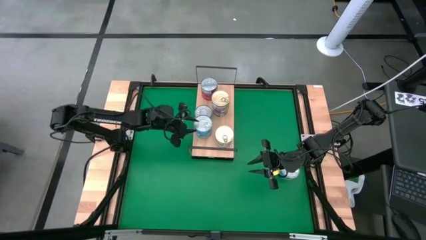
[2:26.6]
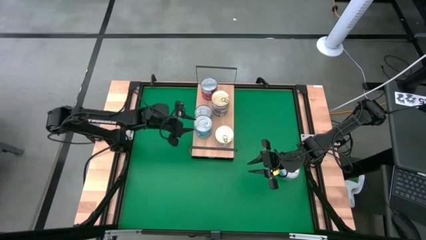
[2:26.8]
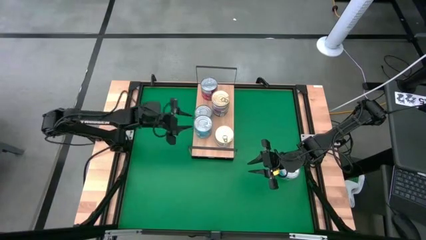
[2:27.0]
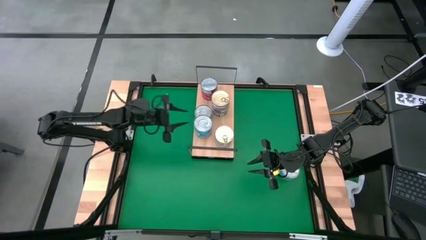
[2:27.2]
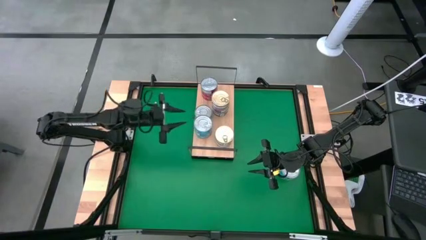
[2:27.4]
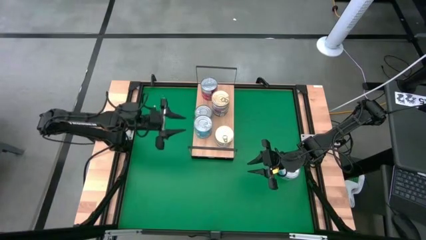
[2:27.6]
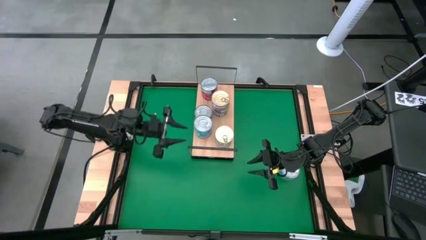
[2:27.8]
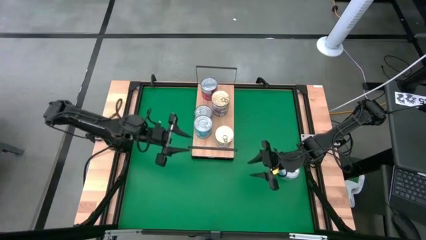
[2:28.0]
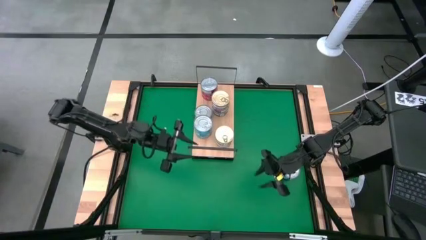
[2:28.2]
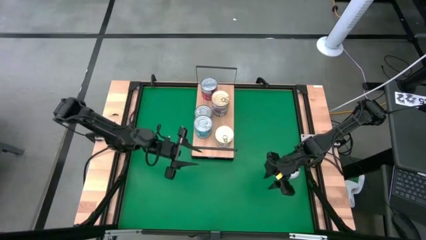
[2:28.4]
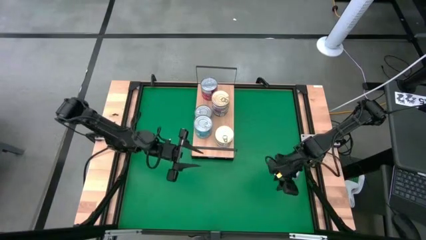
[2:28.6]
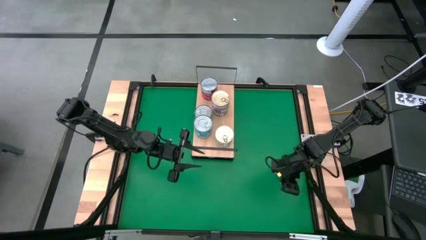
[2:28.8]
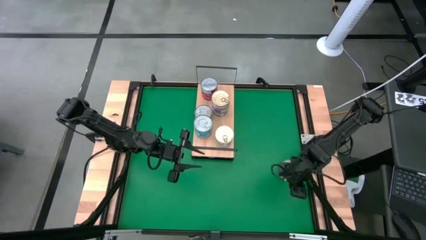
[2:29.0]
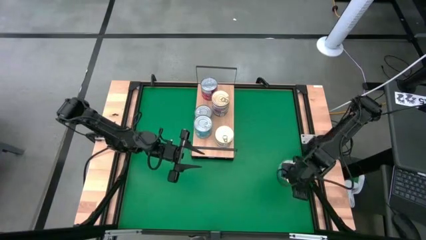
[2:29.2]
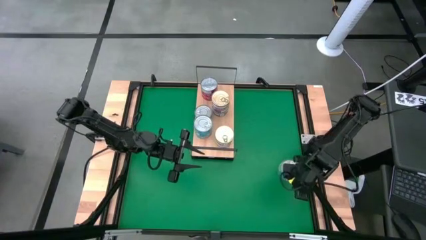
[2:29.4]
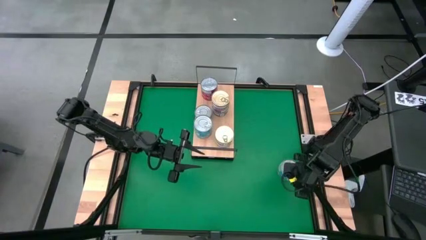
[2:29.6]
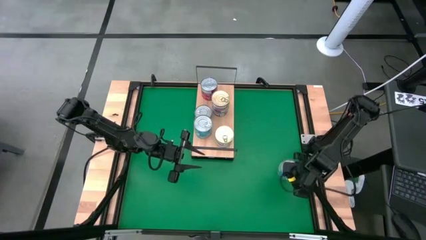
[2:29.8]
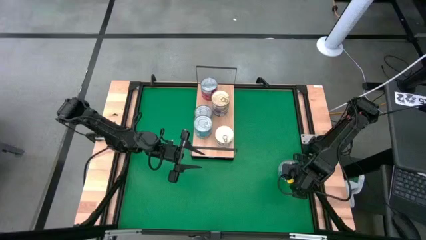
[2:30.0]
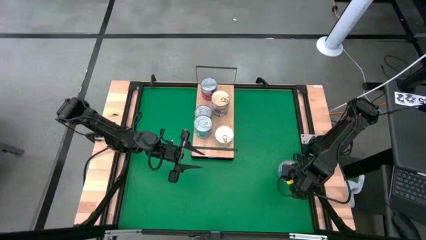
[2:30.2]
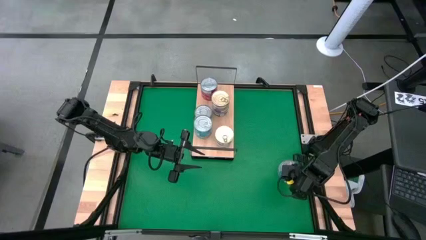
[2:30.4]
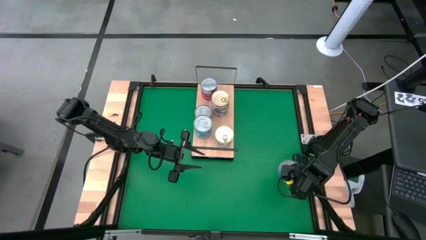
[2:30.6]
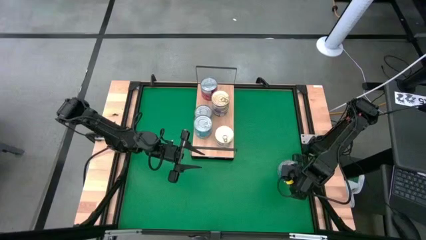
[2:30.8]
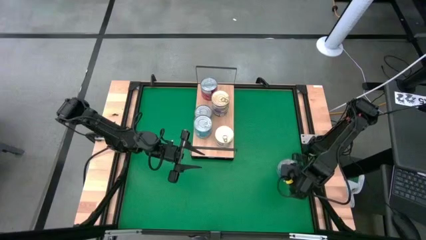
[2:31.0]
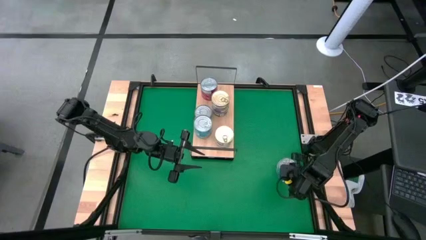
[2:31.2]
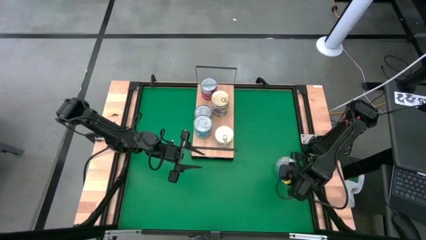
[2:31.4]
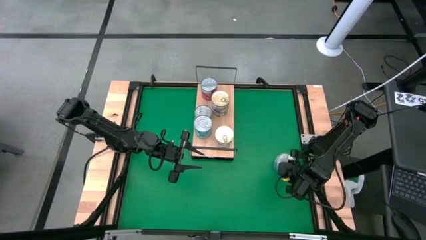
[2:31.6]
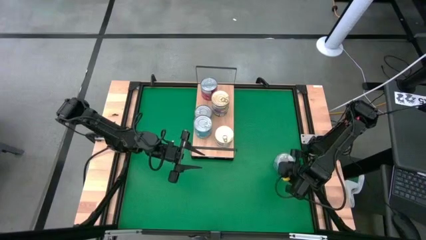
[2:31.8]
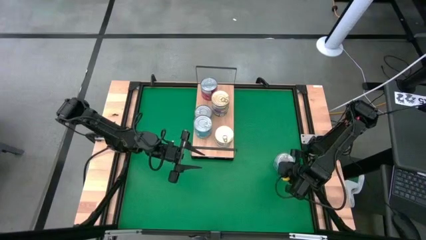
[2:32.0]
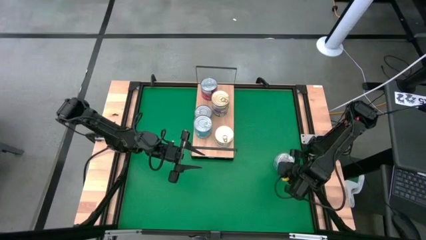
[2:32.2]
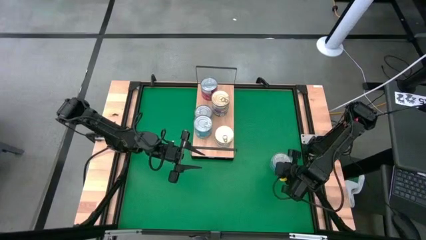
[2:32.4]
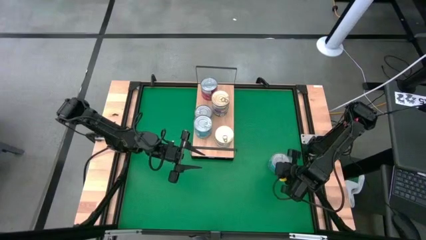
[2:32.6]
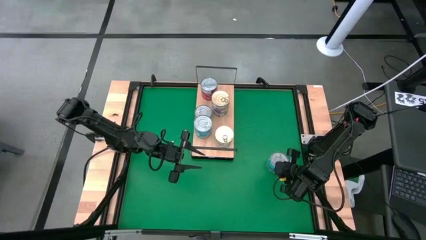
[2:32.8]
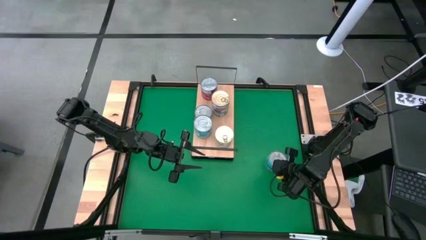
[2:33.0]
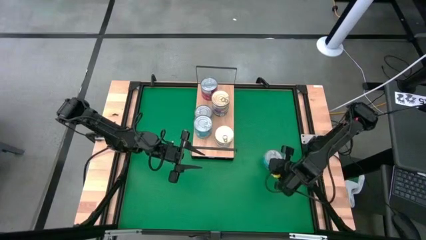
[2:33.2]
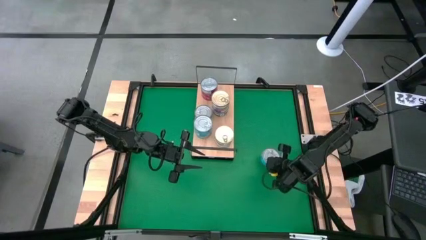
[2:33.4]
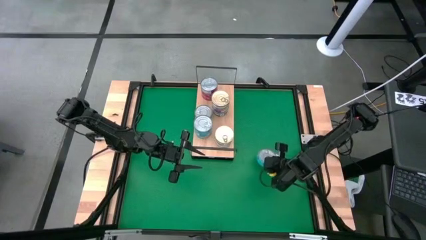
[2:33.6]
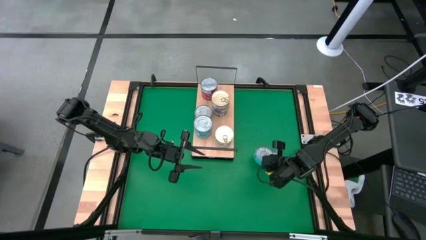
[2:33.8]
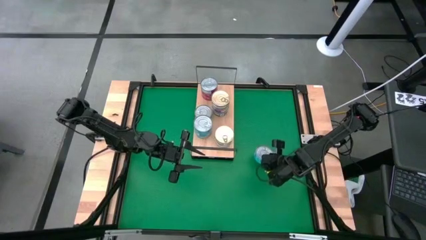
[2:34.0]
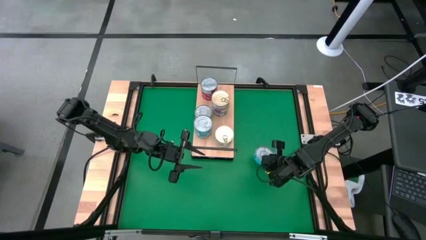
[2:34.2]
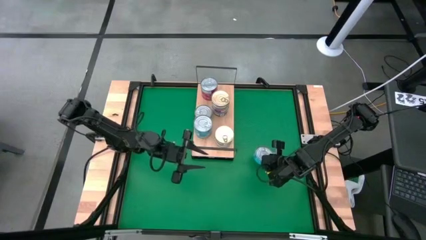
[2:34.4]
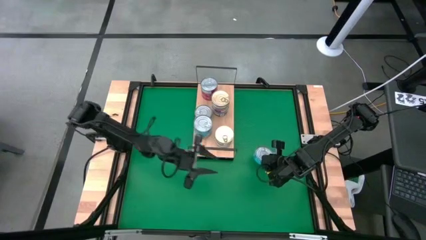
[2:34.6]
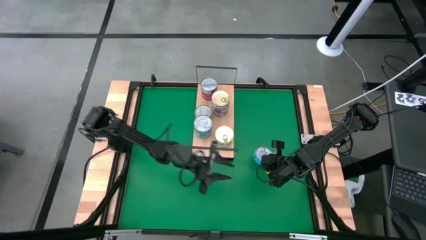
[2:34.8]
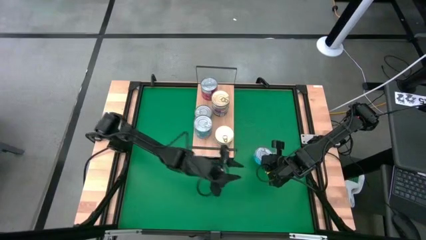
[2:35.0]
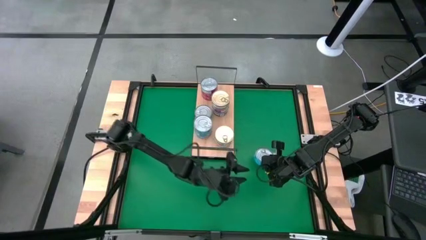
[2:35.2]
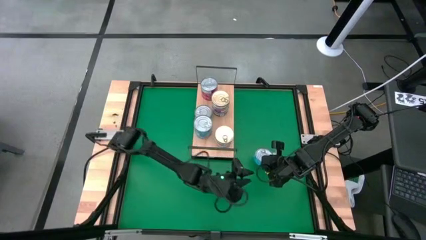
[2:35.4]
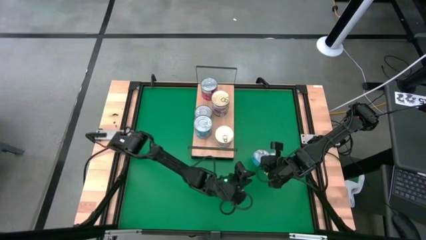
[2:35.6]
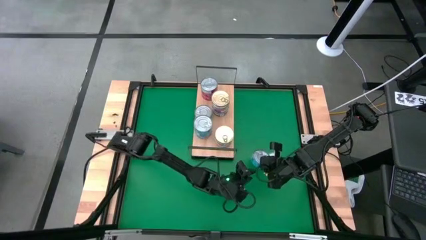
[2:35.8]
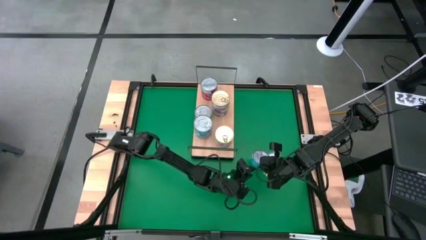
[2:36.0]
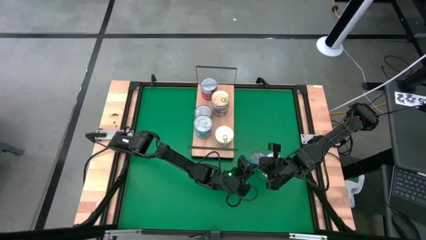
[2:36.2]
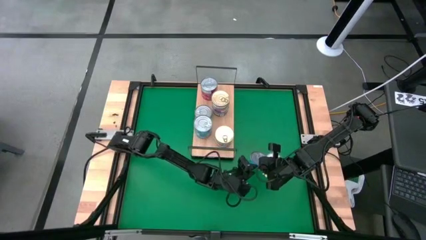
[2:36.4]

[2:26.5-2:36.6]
Task: Stack canned seafood by type on shelf
Stack the light blue tuna can on top of the light blue tuna can on the shelf
